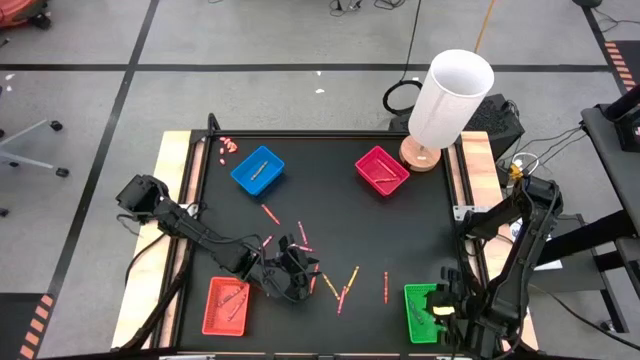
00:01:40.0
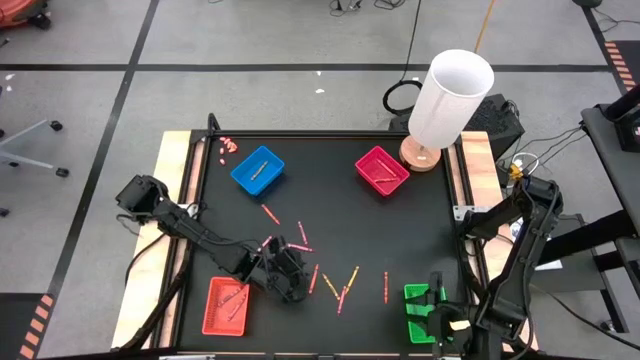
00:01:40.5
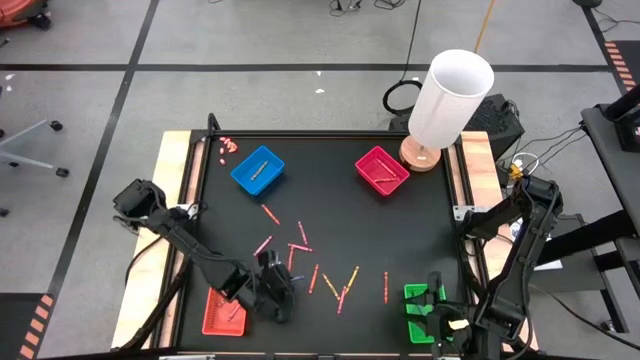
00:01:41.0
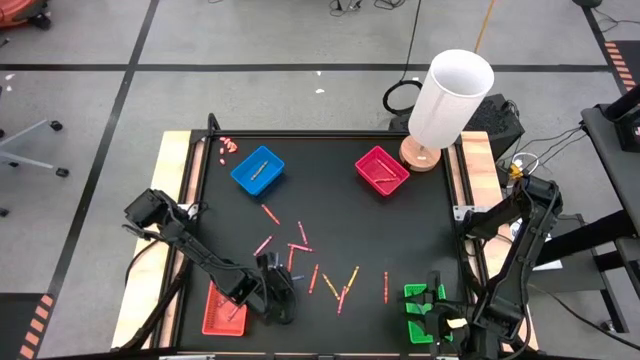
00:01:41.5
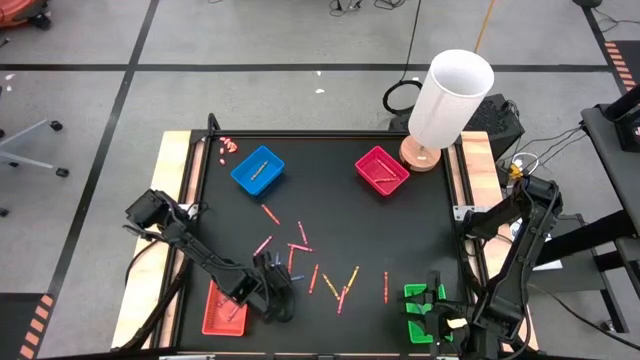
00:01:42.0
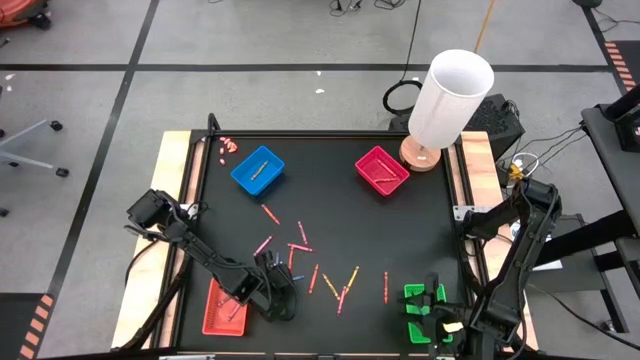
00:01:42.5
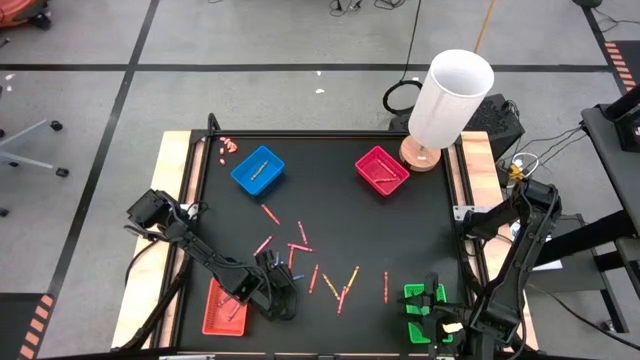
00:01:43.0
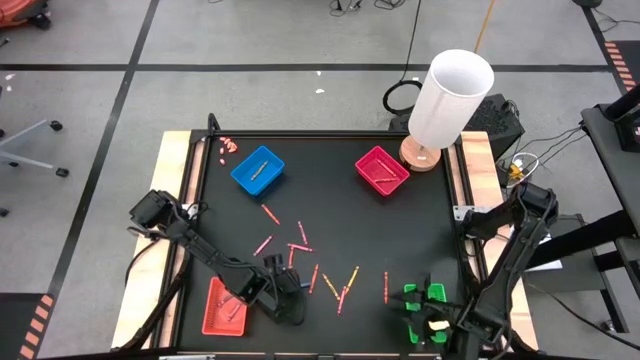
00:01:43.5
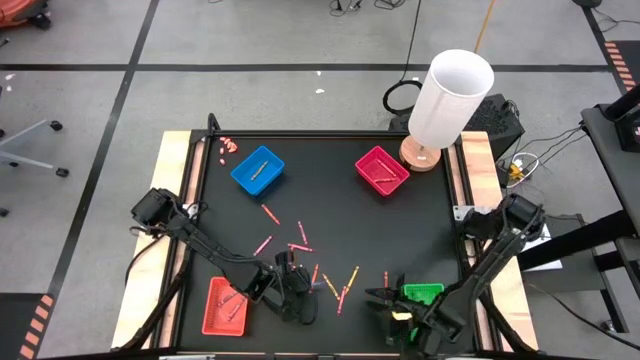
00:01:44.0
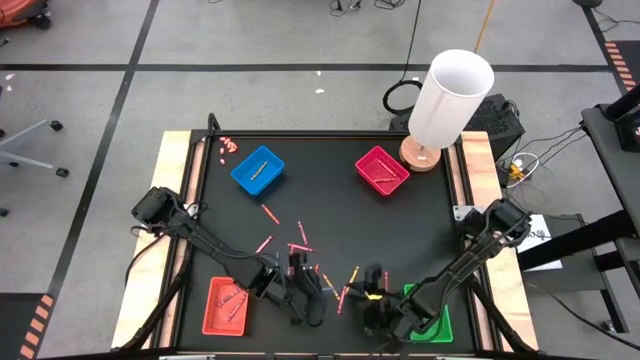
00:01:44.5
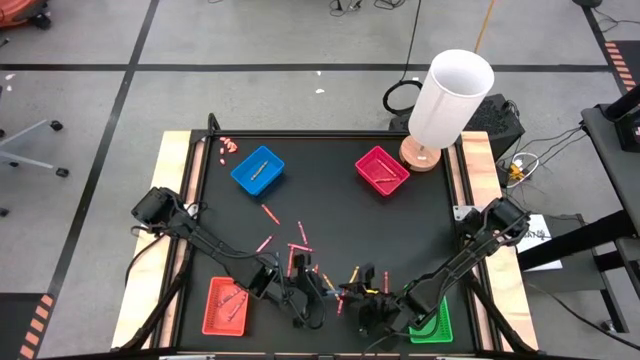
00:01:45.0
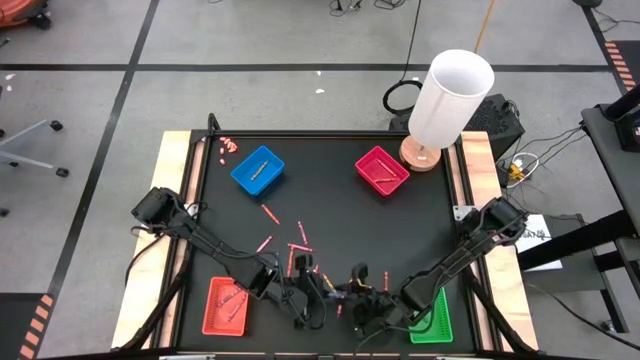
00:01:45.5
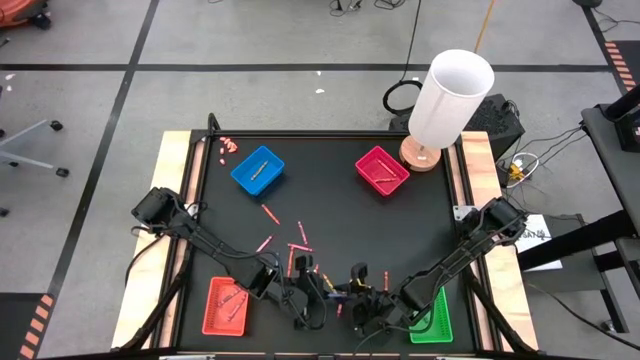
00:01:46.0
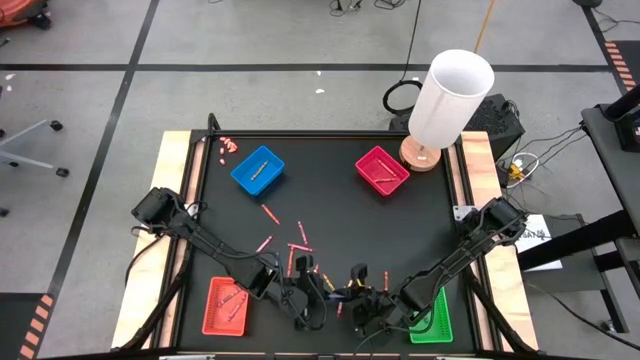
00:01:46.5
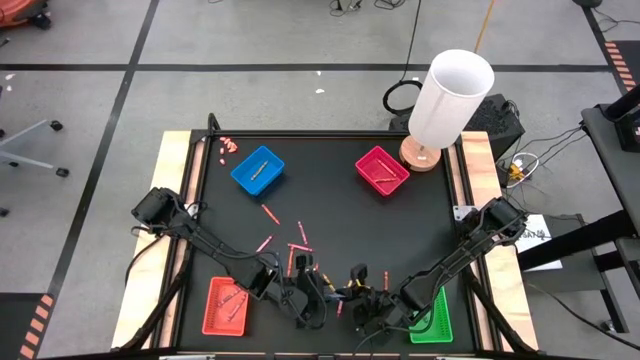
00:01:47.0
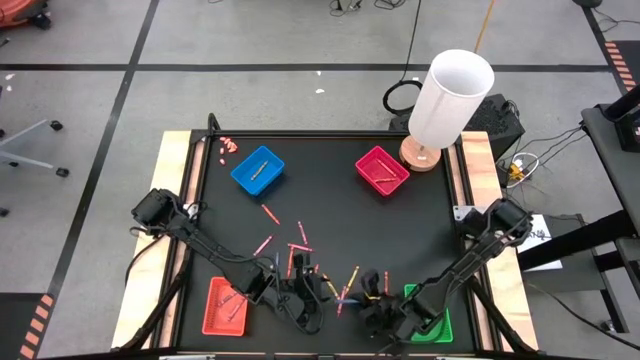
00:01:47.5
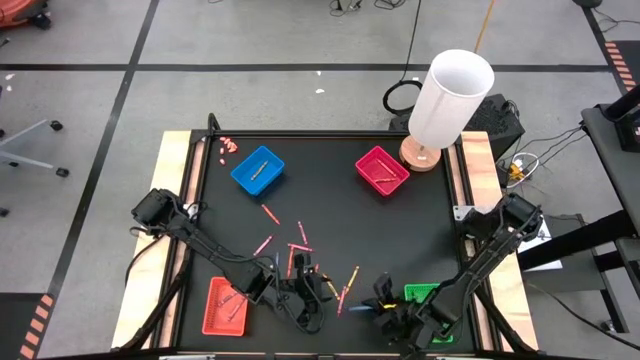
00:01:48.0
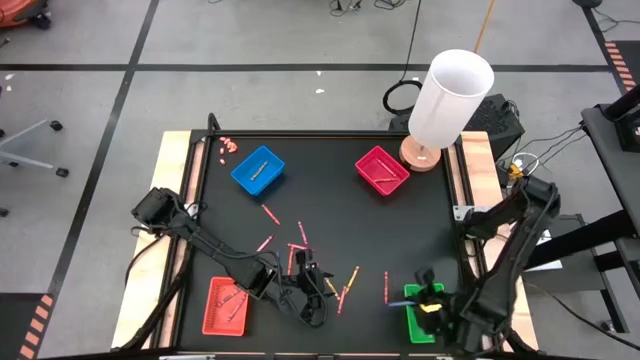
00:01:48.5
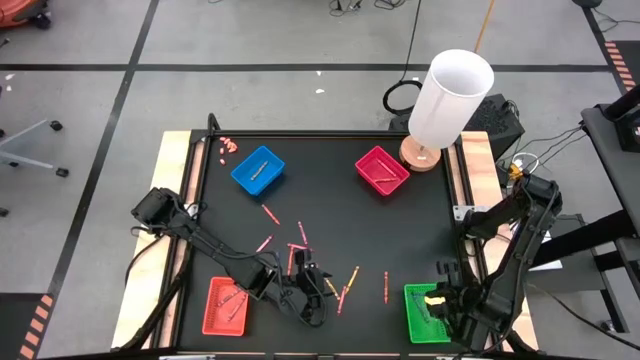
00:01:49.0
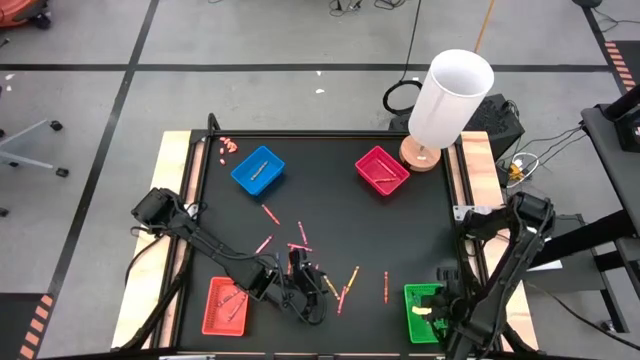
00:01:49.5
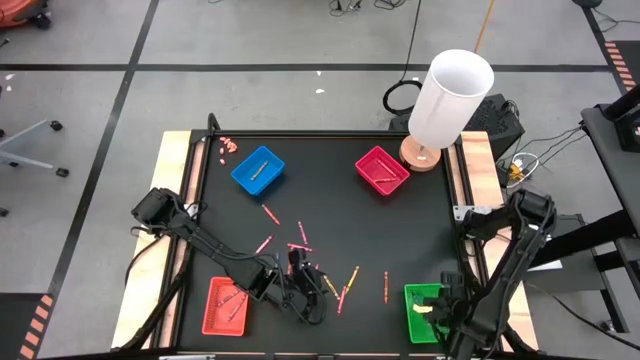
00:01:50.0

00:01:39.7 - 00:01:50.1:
Task: Sort crayons
Put the blue crayon into the green bin

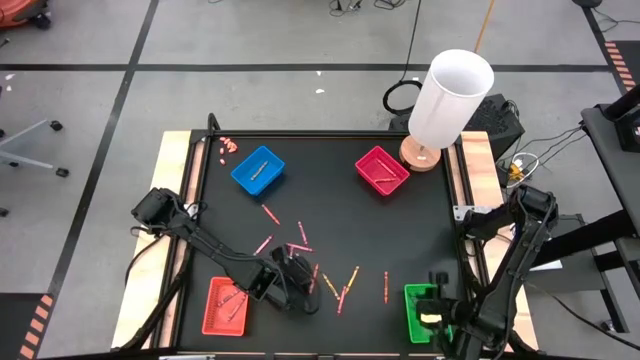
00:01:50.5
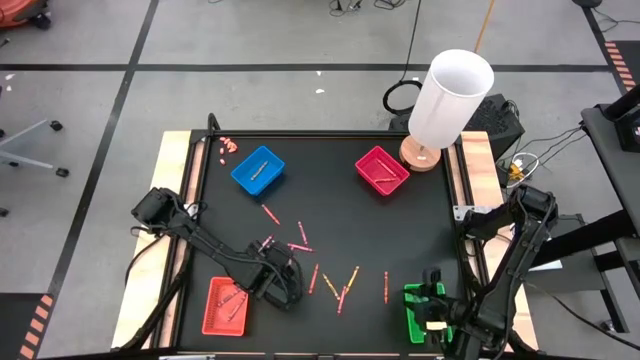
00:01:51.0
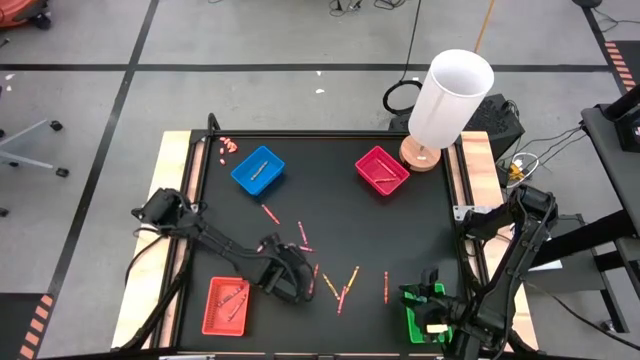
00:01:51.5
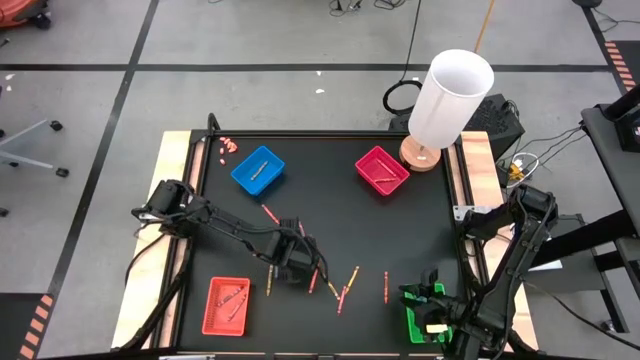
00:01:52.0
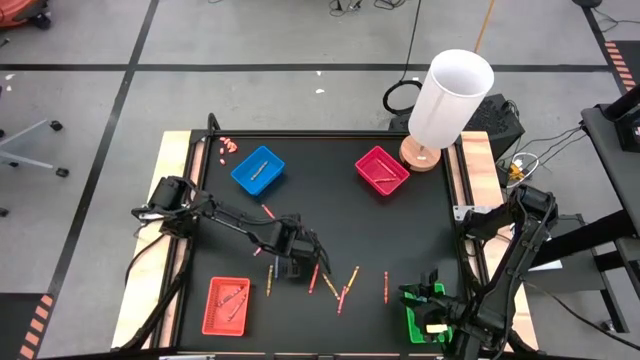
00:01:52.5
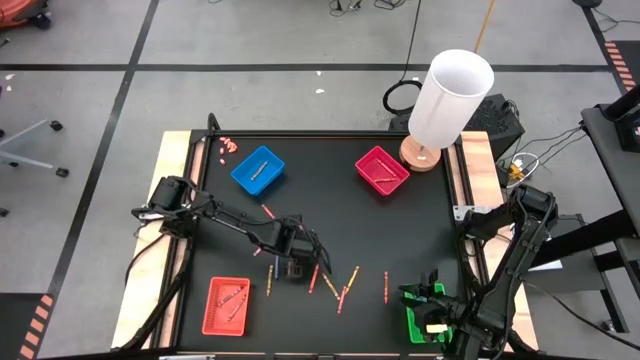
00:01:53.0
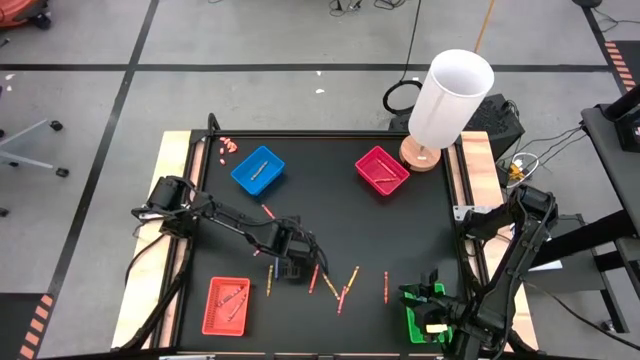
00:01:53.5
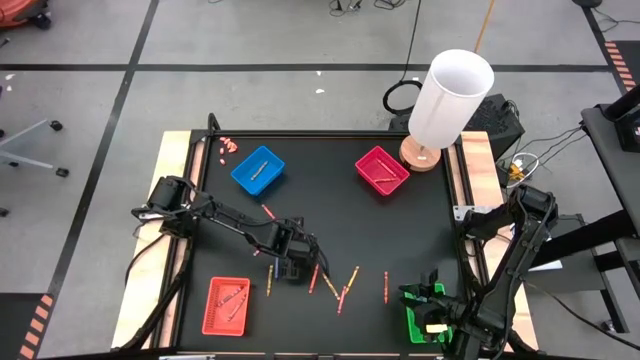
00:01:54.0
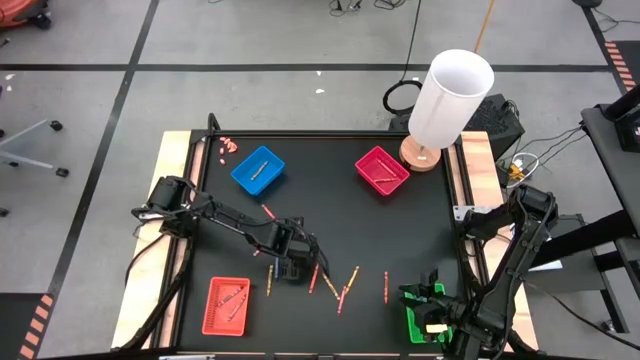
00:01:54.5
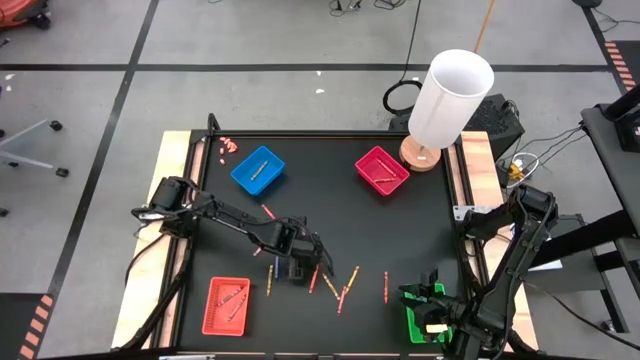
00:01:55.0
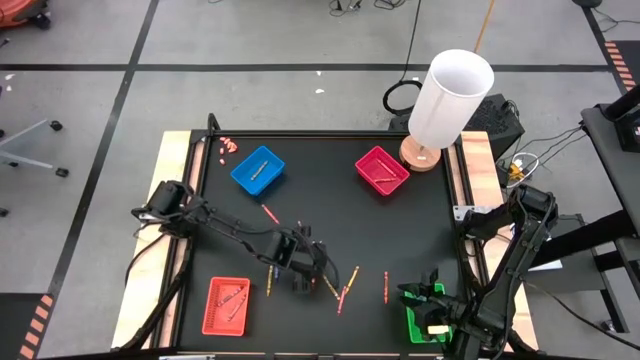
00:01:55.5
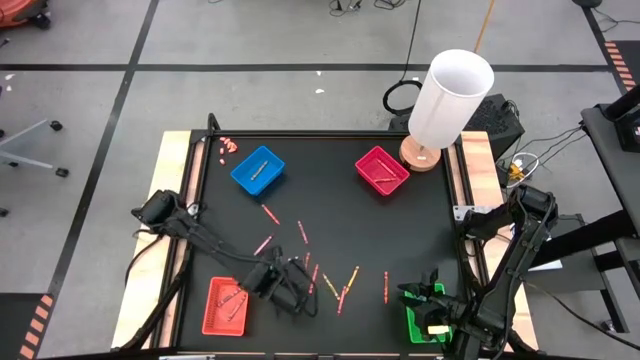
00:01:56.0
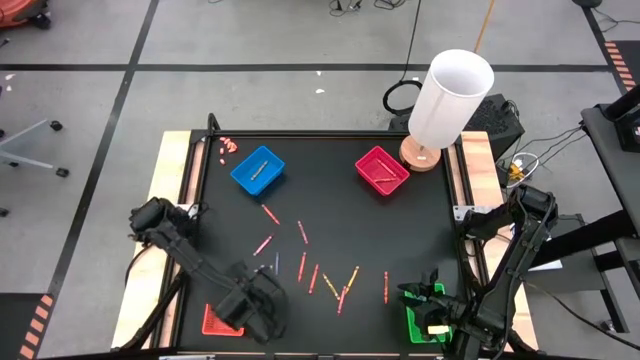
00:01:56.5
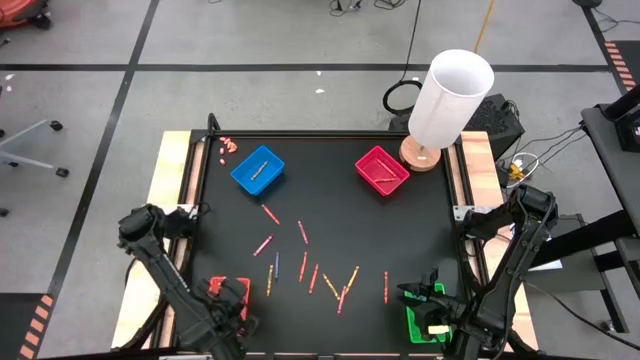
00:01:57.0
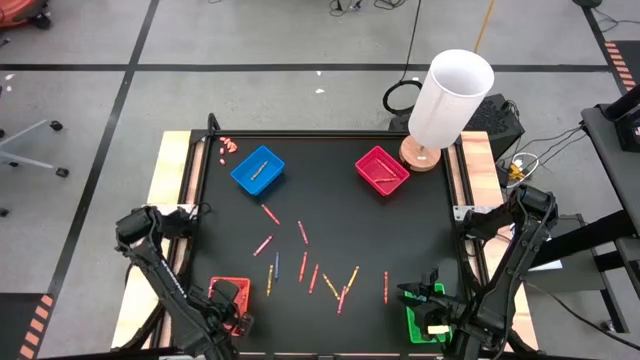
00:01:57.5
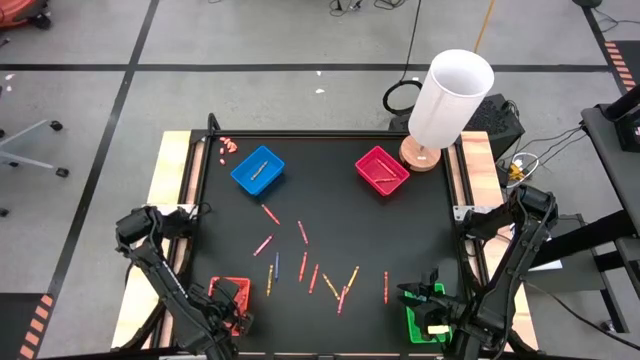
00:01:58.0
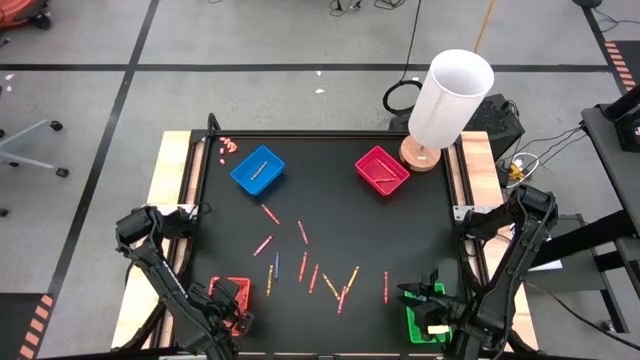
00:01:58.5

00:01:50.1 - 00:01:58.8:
Put the red crayon into the orange bin

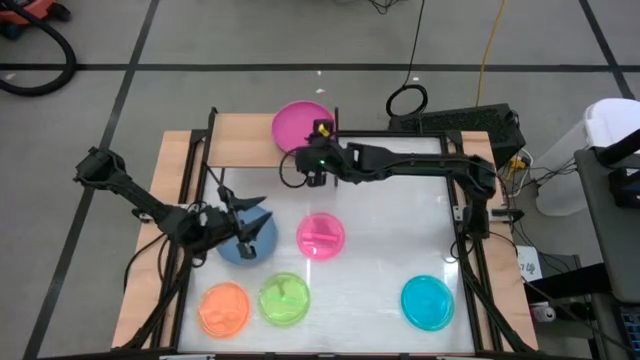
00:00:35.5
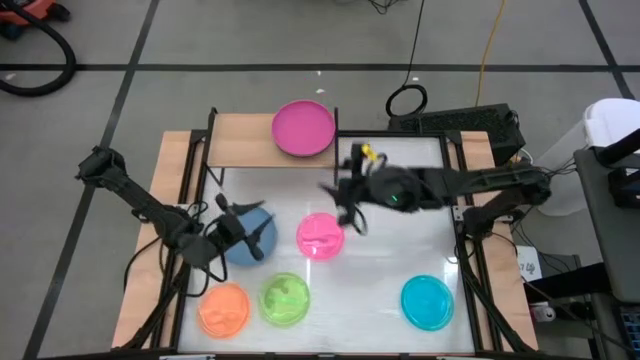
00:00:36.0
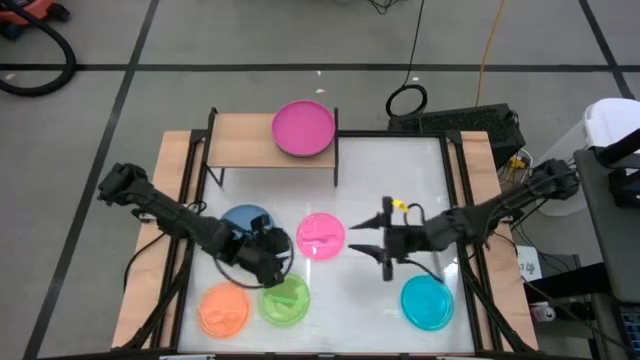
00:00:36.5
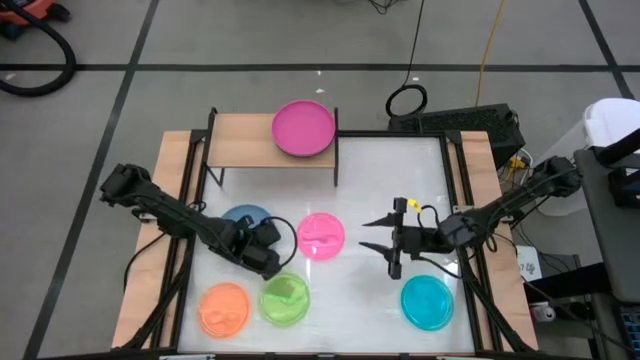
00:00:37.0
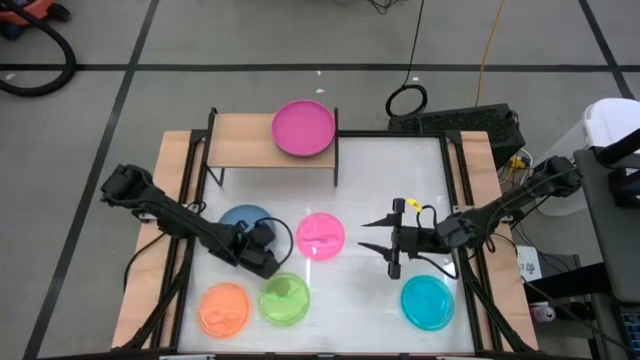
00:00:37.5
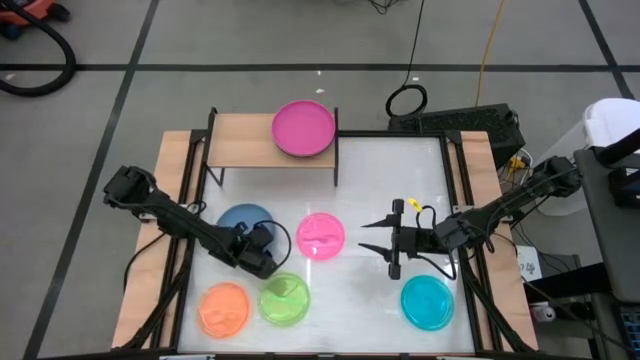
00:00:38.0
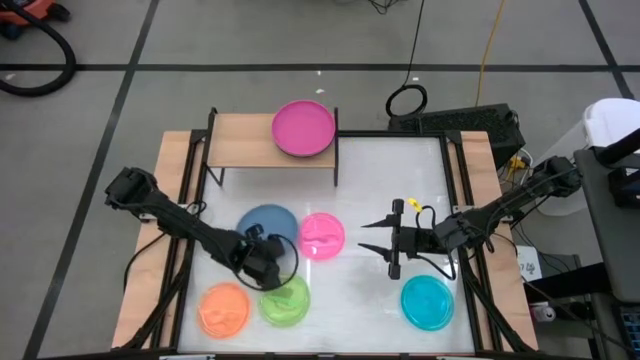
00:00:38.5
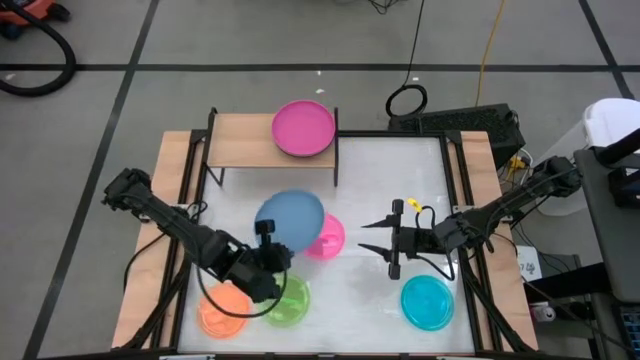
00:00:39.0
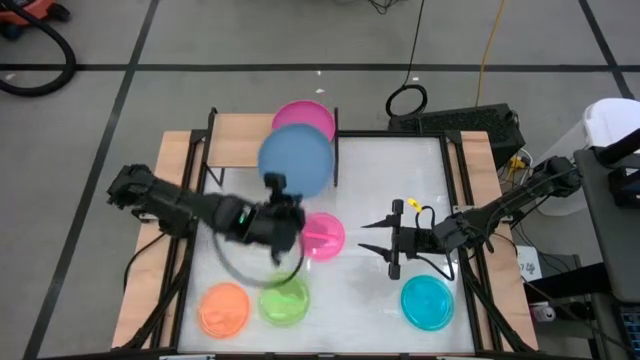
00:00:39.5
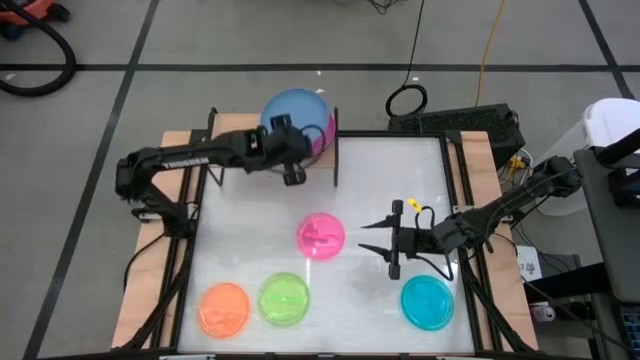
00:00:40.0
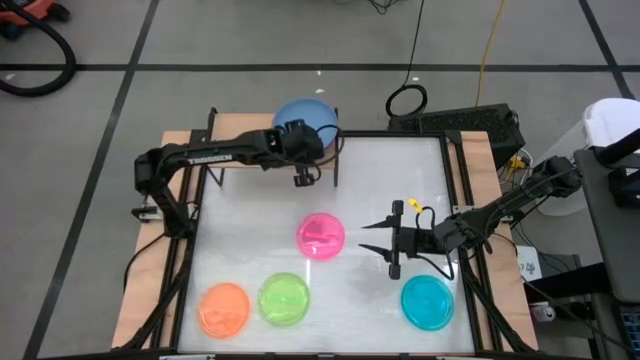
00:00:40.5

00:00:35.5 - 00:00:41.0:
Task: Place and stack plates onto a shelf
Stack the blue plate on top of the pink plate on the shelf
